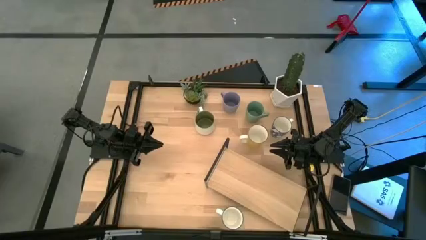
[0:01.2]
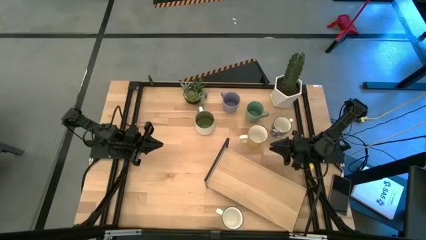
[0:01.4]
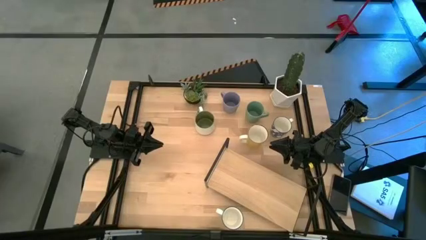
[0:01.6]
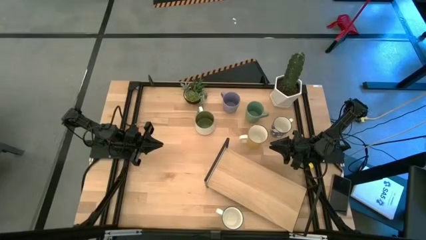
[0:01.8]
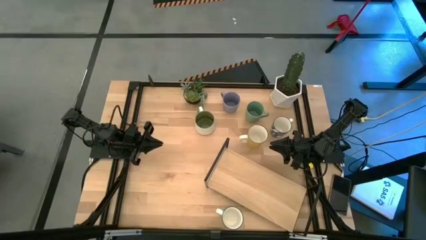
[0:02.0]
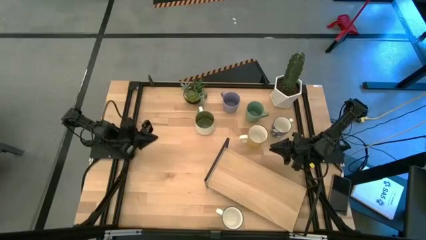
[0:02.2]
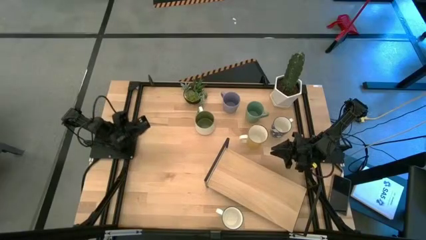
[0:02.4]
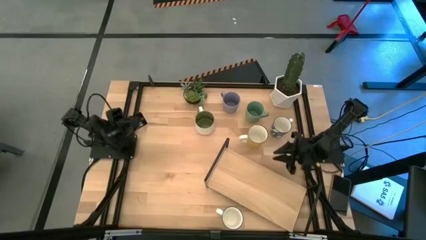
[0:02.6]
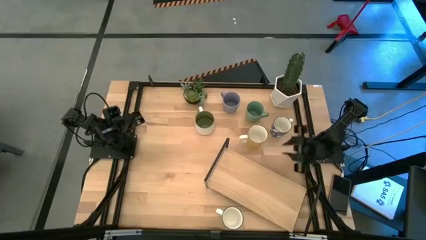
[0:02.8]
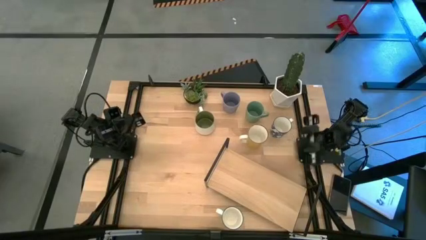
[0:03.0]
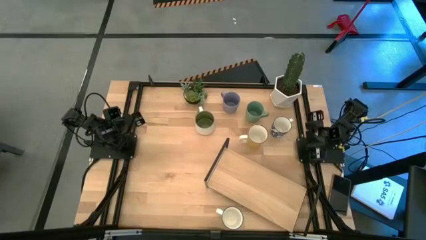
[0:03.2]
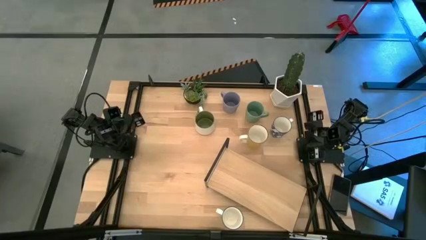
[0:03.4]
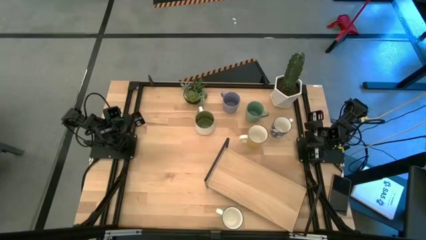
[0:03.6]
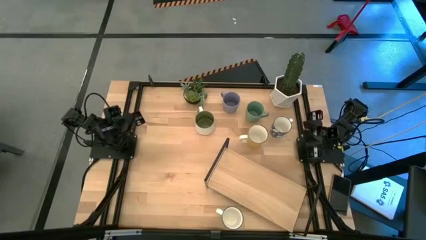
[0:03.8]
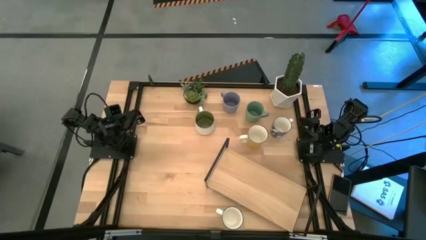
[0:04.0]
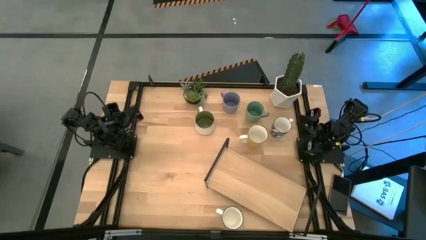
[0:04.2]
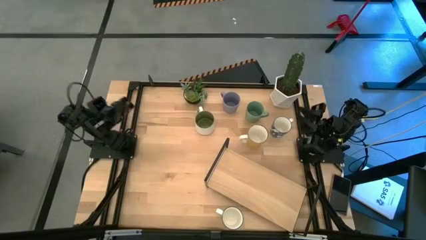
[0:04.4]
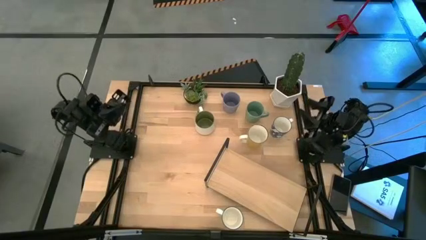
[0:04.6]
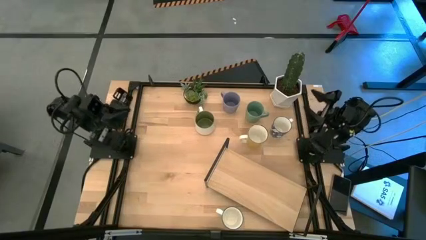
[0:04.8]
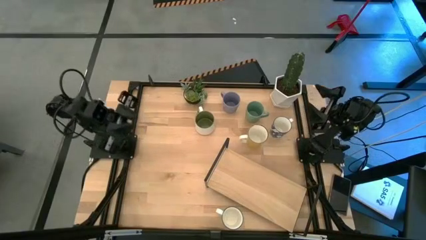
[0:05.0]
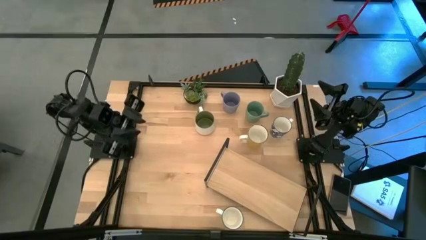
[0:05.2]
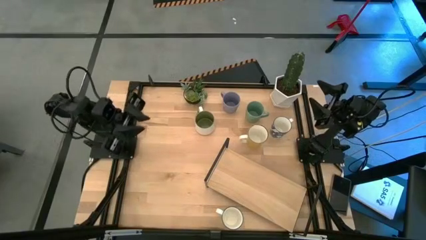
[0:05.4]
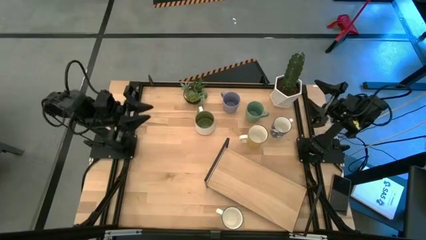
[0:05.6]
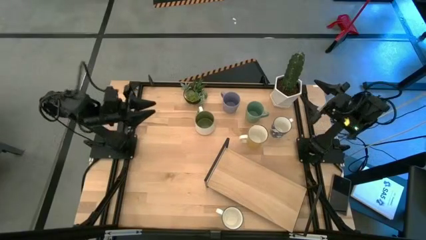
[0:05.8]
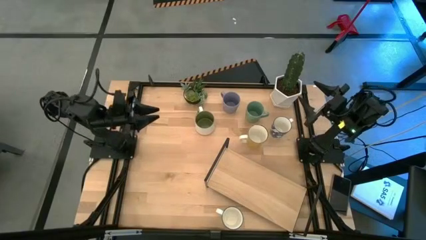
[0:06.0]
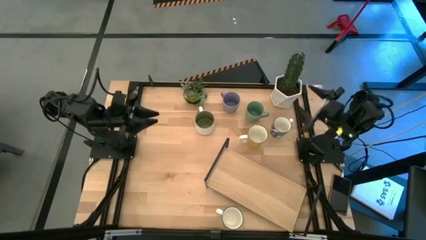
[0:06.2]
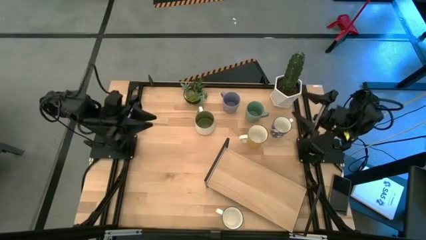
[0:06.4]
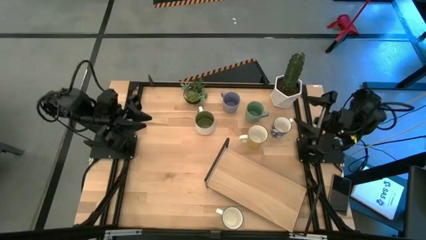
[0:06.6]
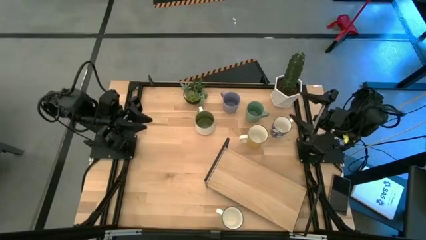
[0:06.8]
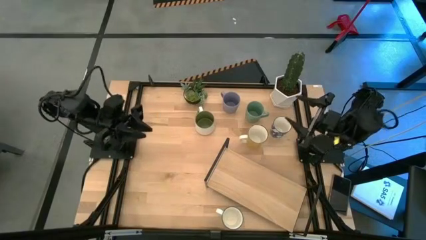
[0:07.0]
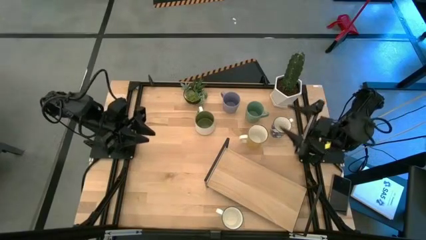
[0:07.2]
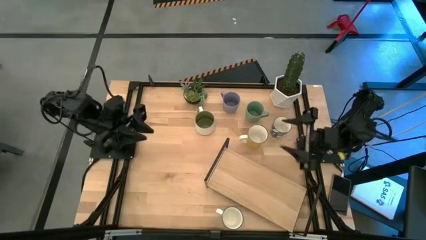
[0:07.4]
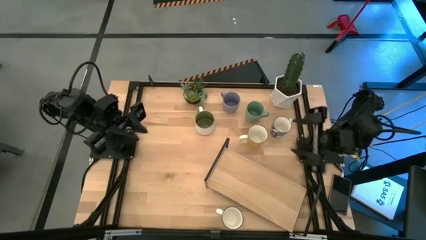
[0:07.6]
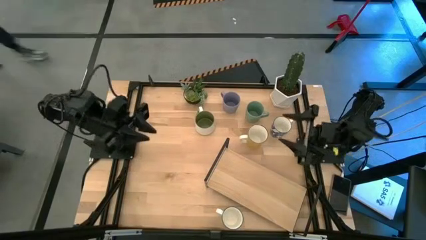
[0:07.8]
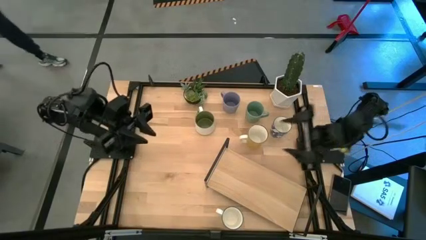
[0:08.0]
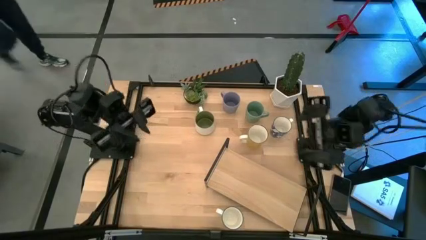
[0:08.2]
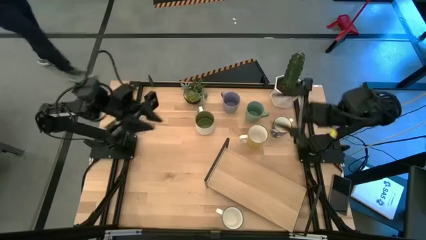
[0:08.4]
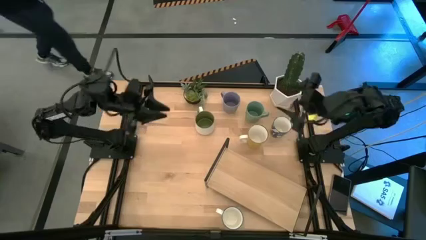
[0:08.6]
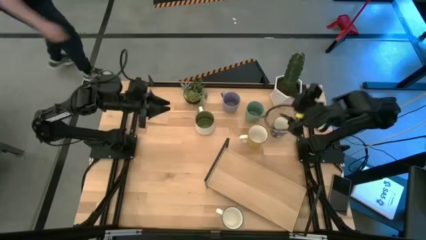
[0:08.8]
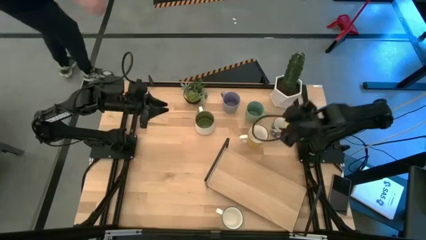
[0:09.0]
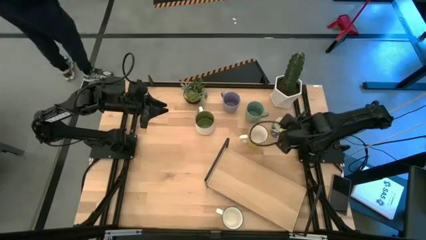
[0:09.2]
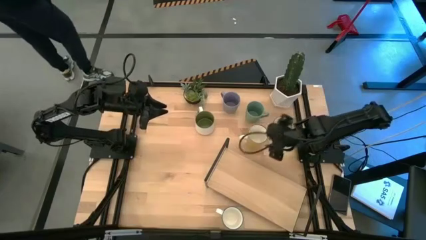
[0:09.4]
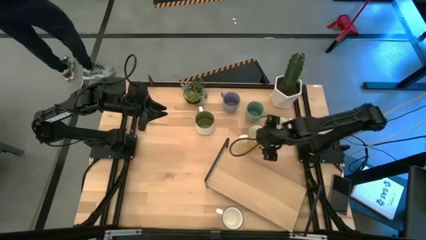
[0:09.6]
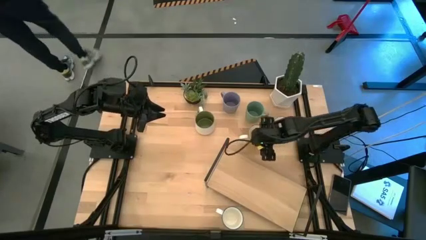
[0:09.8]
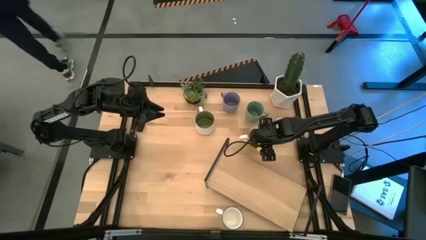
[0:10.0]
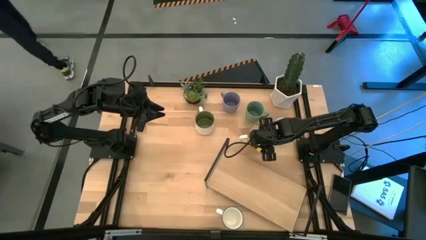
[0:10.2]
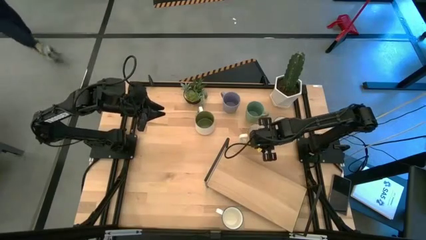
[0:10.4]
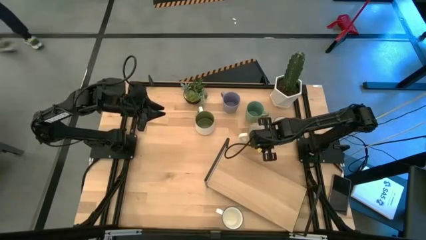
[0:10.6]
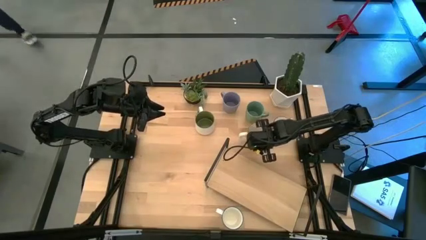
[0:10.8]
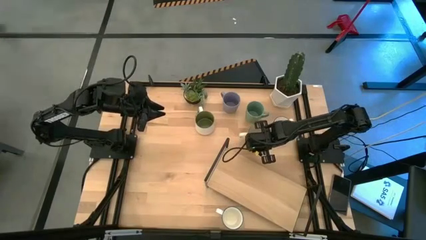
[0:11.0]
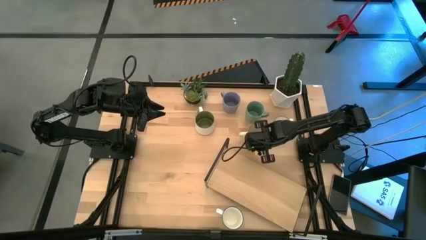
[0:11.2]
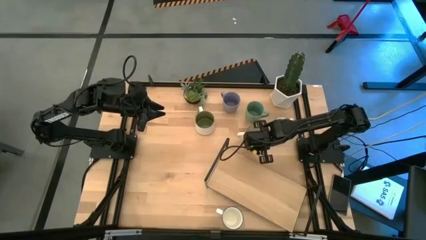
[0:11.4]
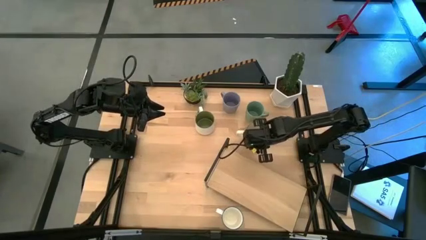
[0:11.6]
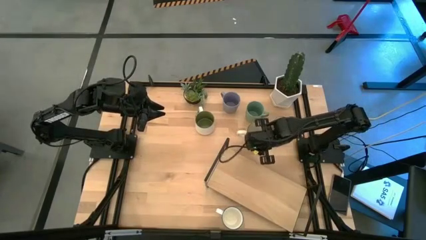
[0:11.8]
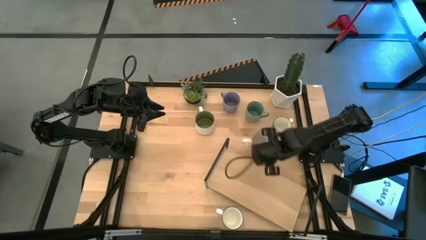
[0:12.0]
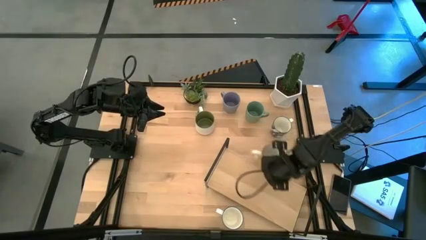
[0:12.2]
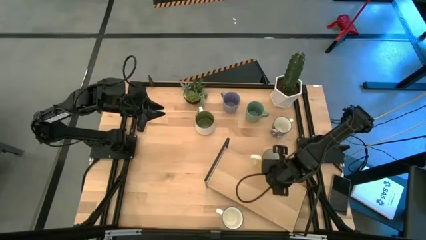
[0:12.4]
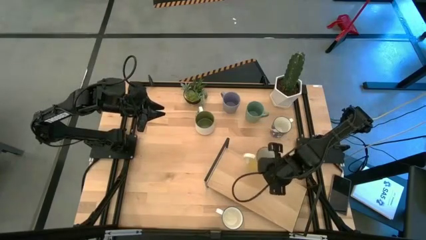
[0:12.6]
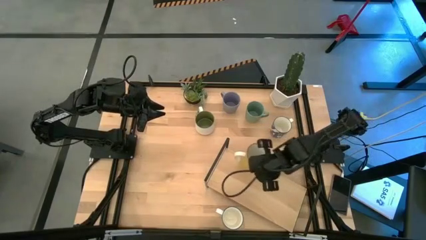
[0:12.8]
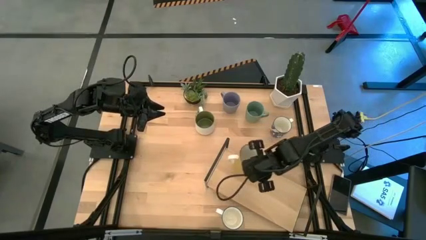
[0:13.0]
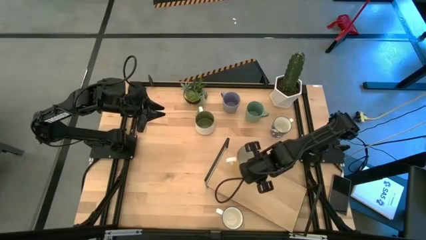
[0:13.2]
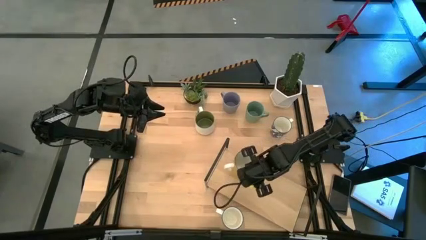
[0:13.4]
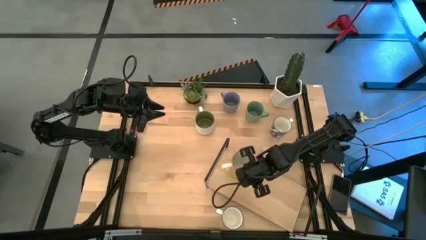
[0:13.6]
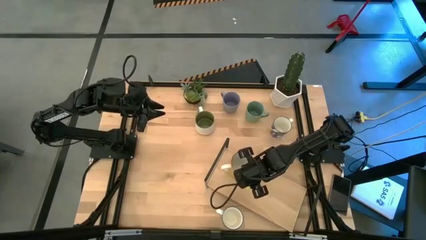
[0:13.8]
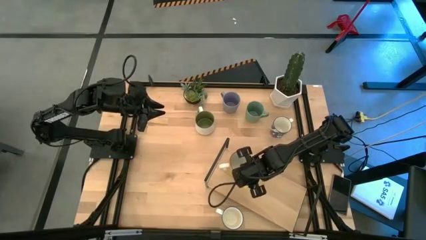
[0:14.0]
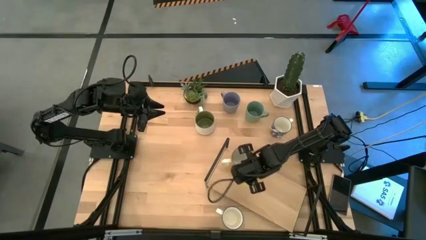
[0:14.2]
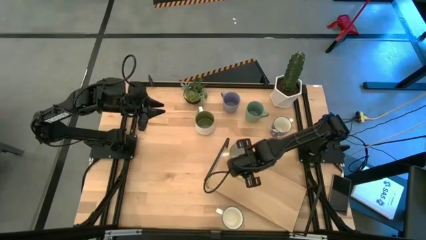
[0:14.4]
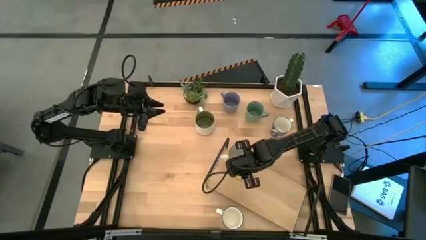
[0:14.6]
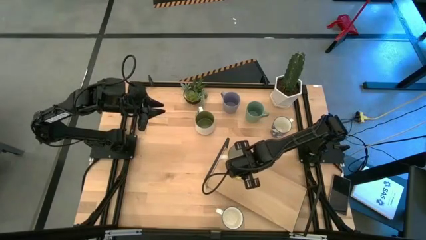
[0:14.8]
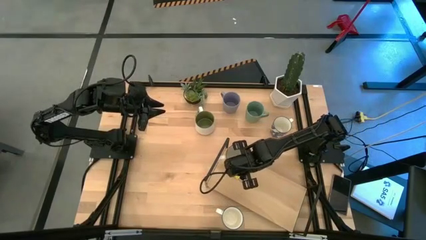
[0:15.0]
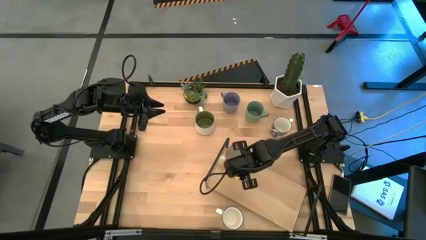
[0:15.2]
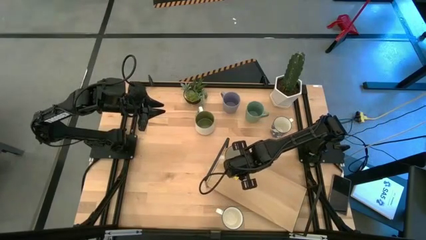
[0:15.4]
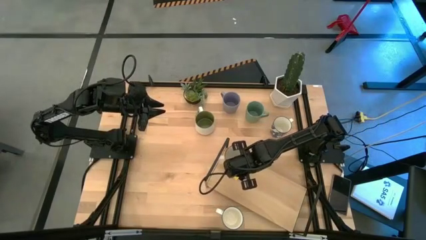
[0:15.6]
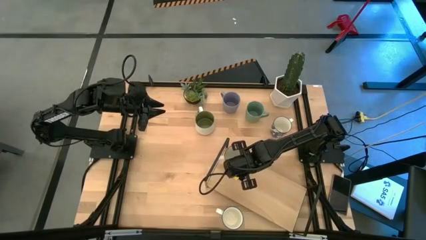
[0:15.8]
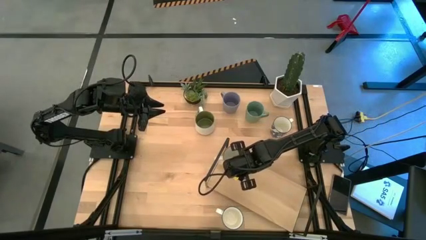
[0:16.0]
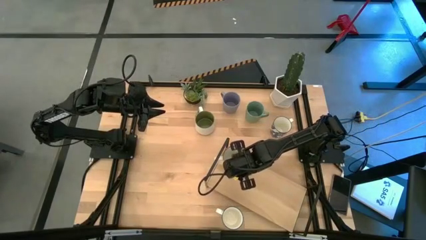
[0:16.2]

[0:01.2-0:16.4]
Task: Place coffee mugs
Put the yellow mug on the shelf
